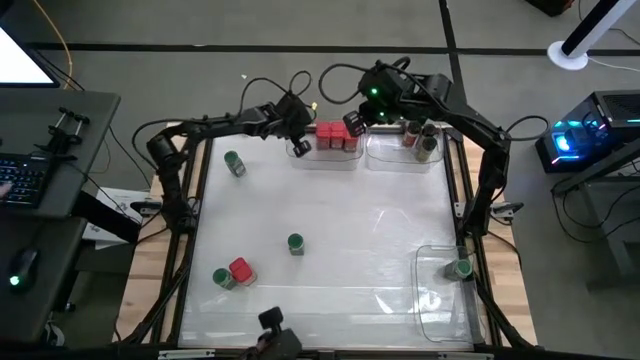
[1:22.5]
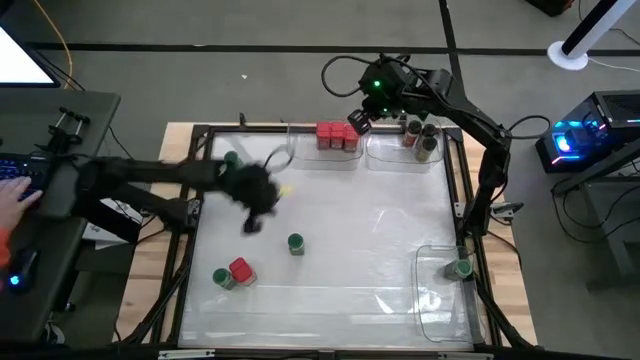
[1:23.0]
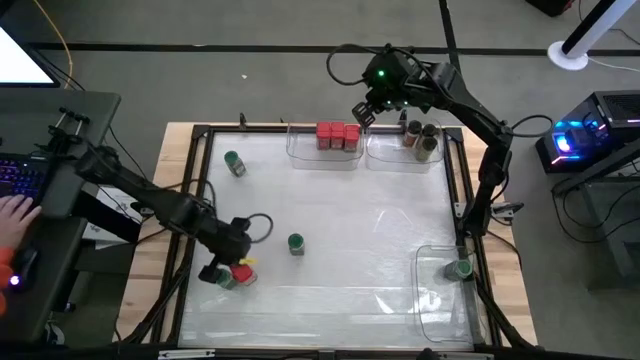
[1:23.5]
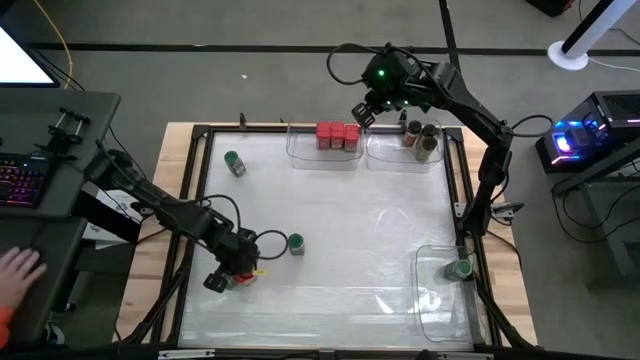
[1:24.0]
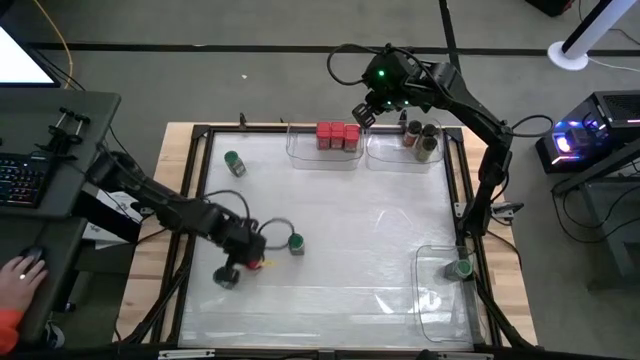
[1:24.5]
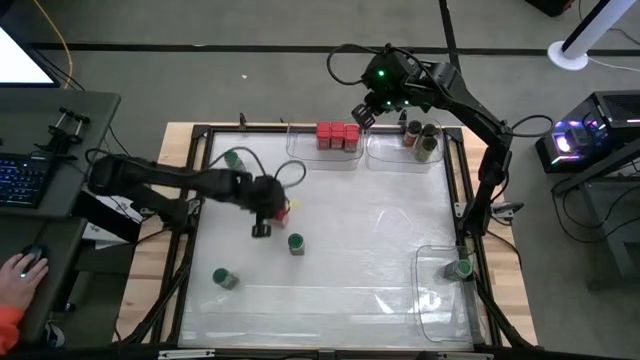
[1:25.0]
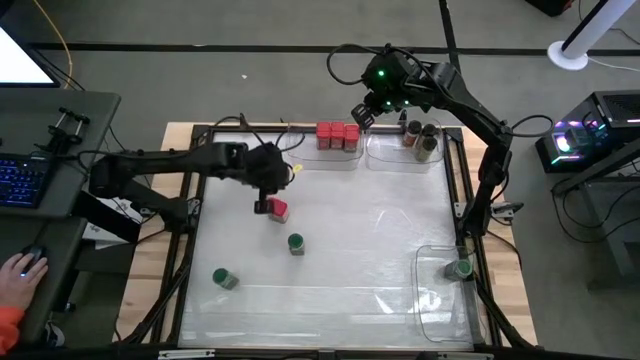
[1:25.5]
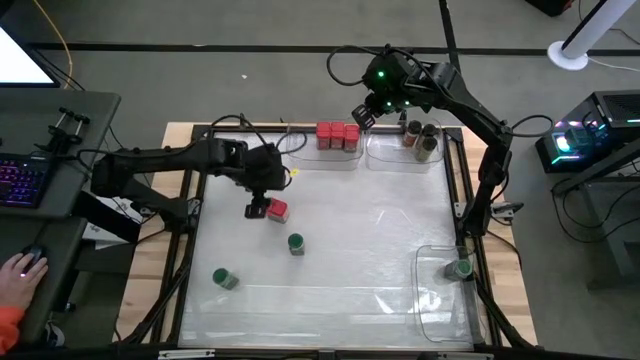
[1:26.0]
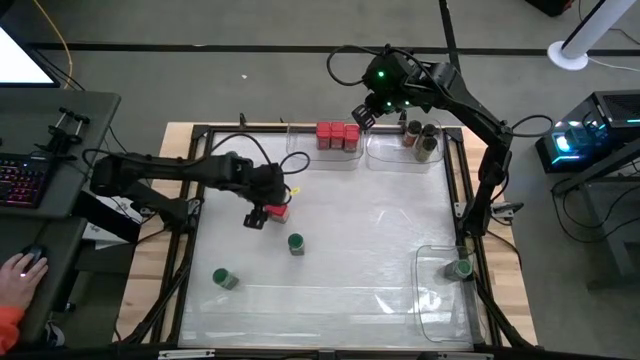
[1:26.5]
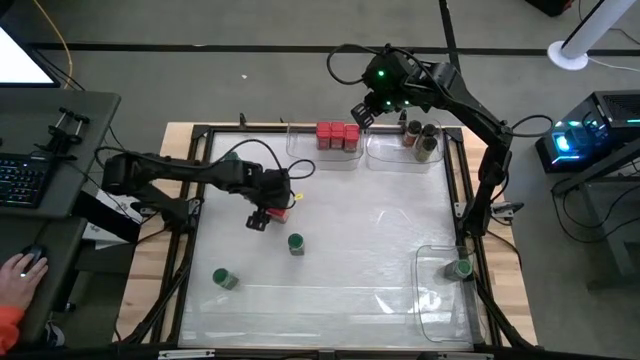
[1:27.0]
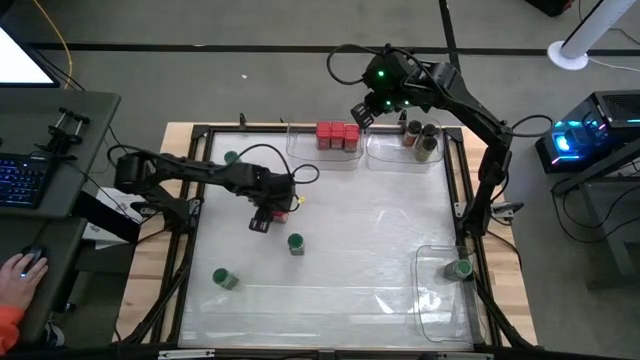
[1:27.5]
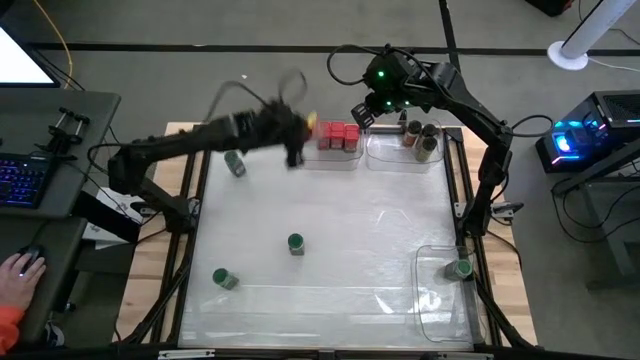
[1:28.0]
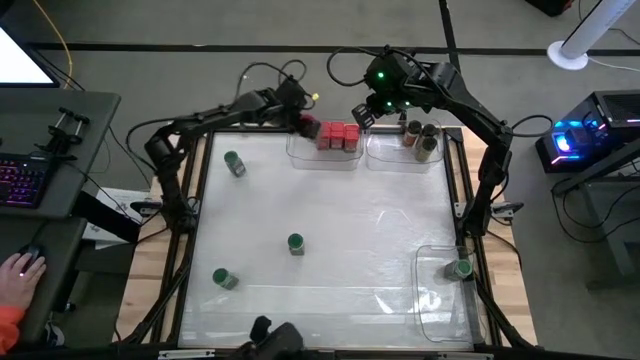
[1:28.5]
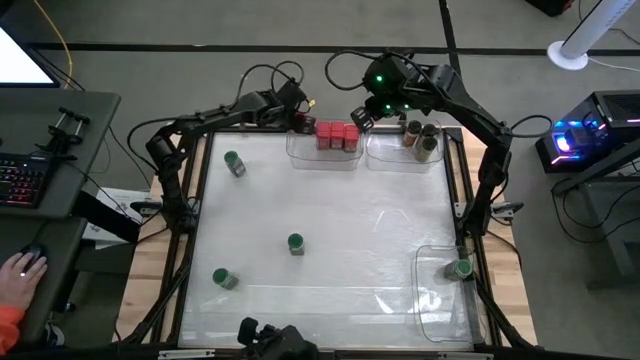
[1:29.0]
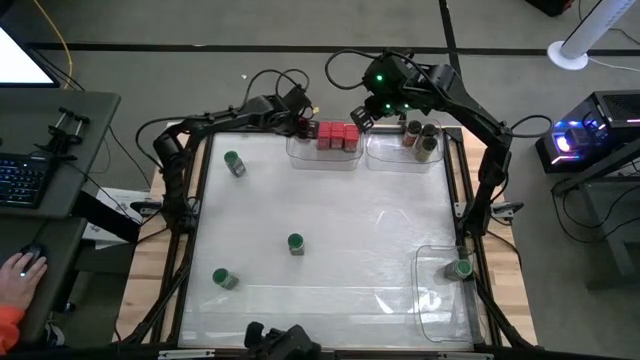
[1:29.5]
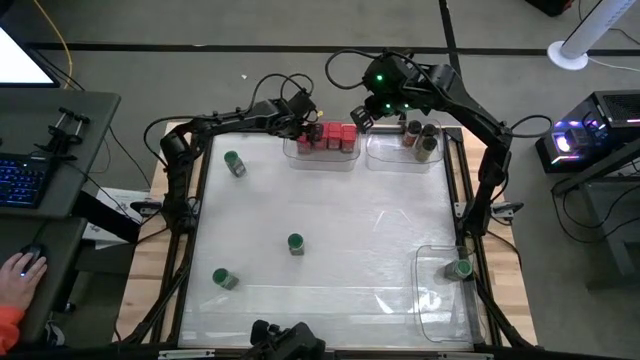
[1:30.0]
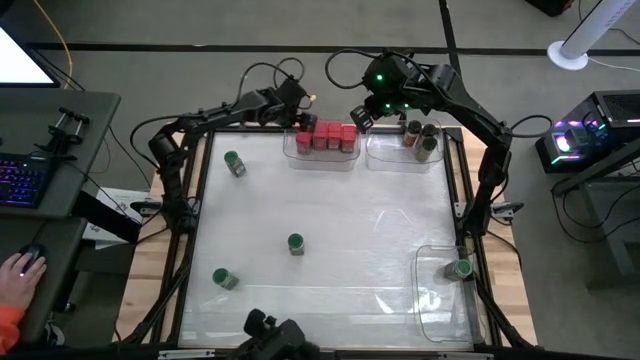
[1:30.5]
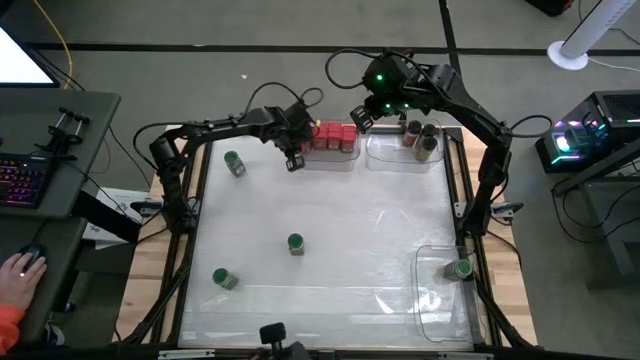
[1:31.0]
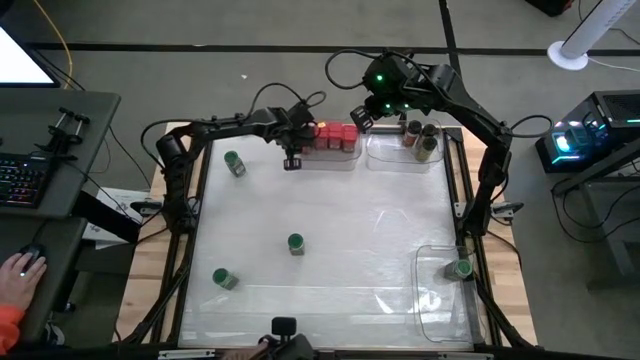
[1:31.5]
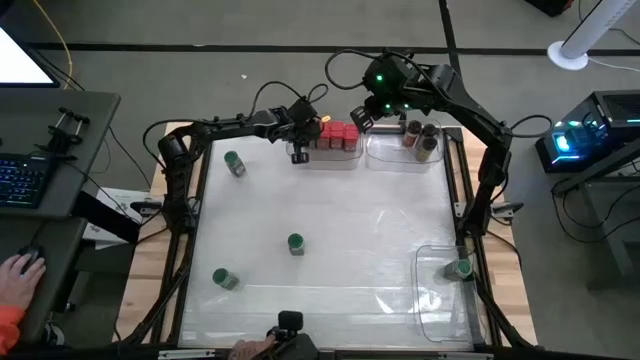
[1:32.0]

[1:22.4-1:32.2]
Task: Sort spices by type
Put the red seasoning can into the left transparent bin

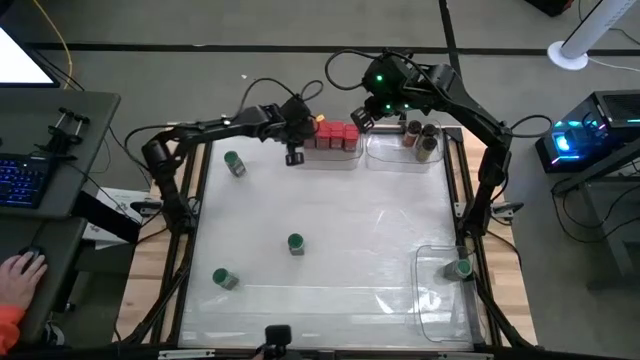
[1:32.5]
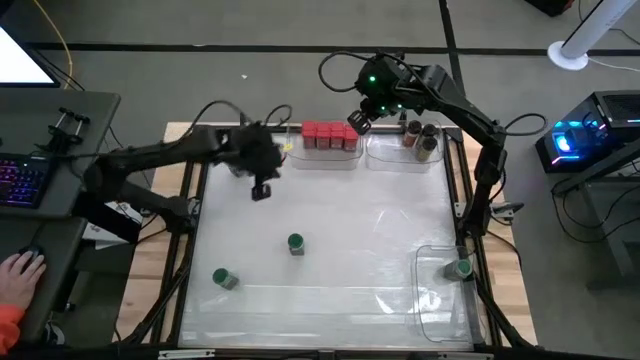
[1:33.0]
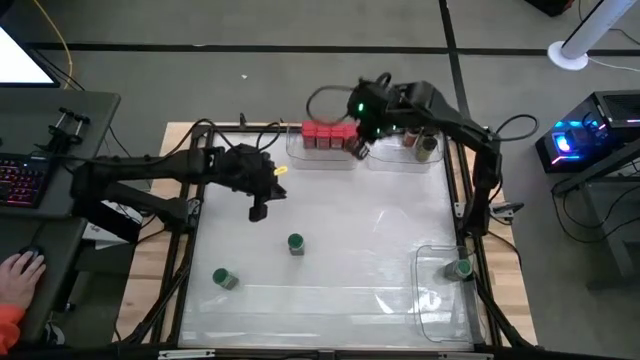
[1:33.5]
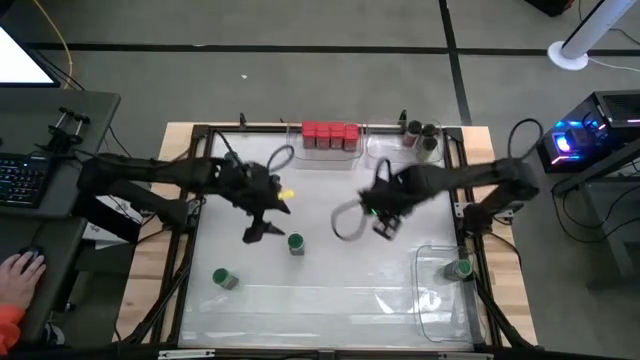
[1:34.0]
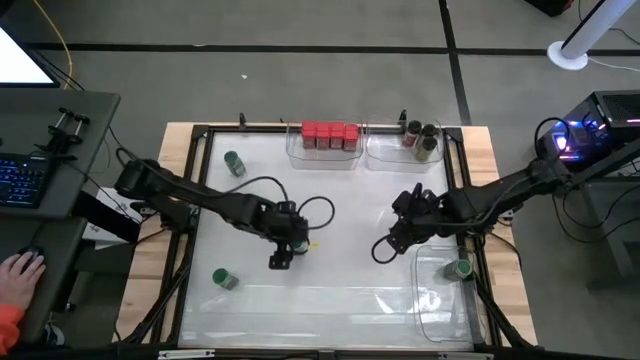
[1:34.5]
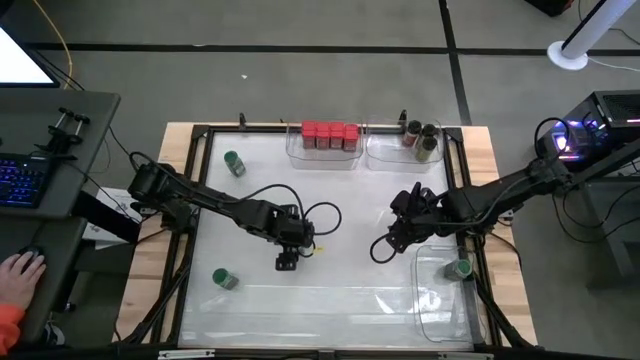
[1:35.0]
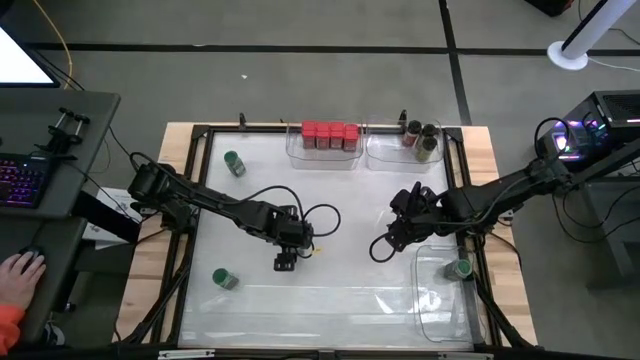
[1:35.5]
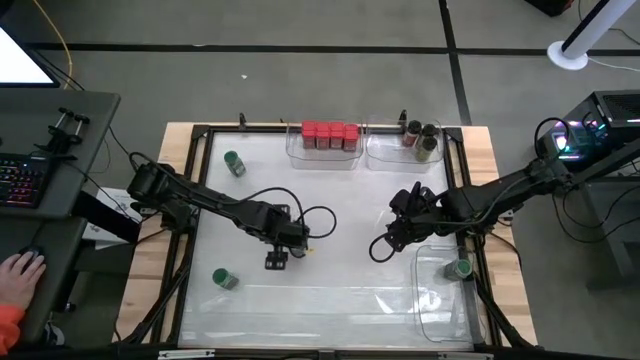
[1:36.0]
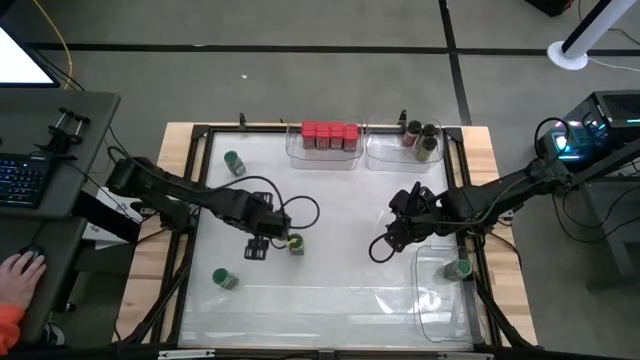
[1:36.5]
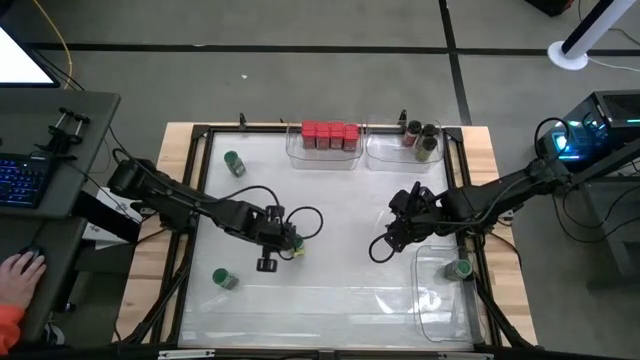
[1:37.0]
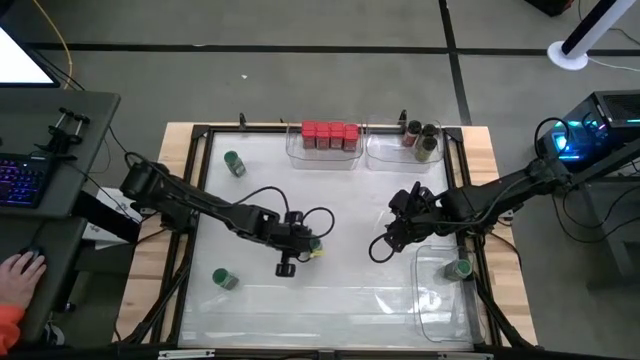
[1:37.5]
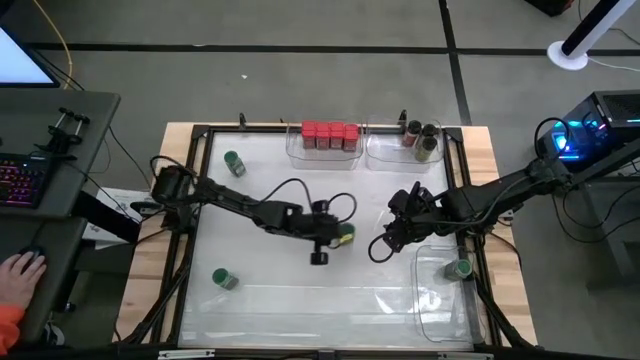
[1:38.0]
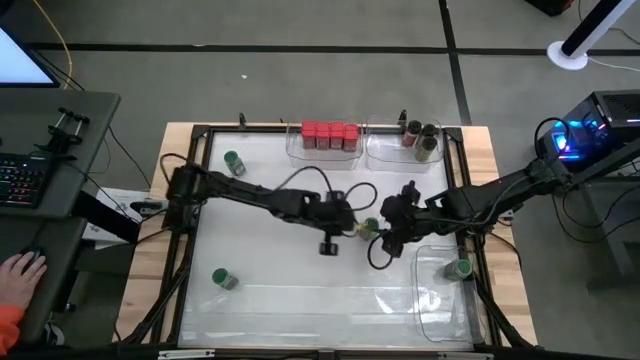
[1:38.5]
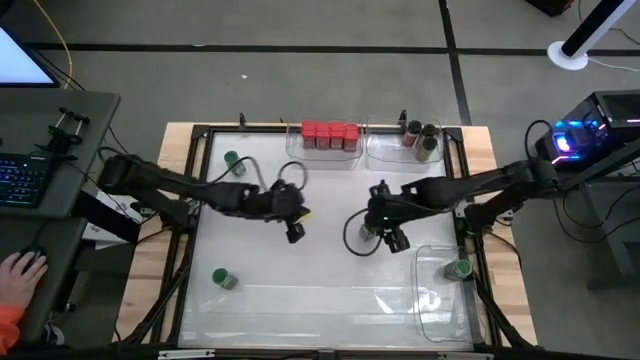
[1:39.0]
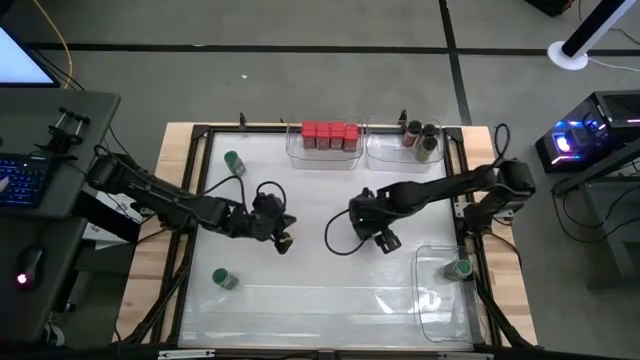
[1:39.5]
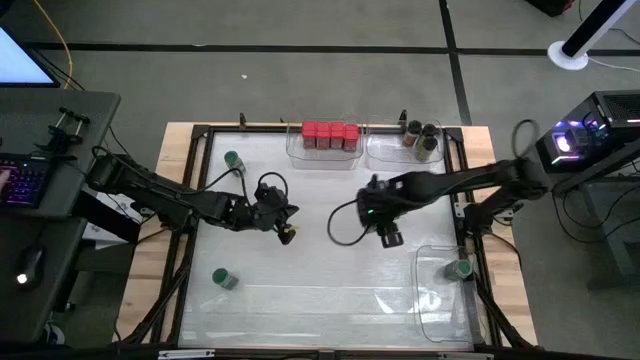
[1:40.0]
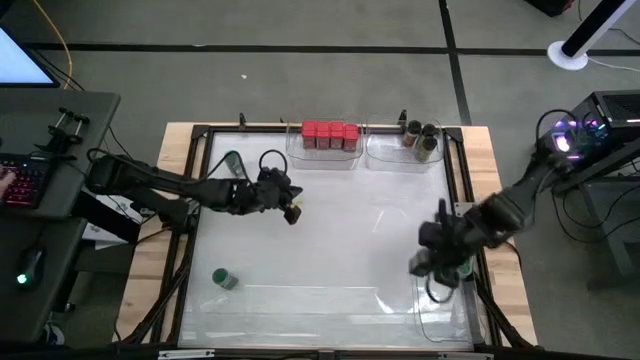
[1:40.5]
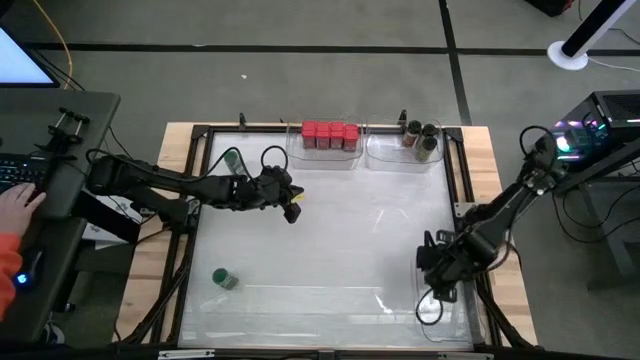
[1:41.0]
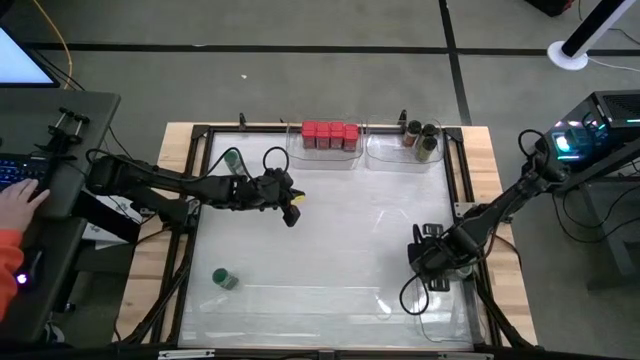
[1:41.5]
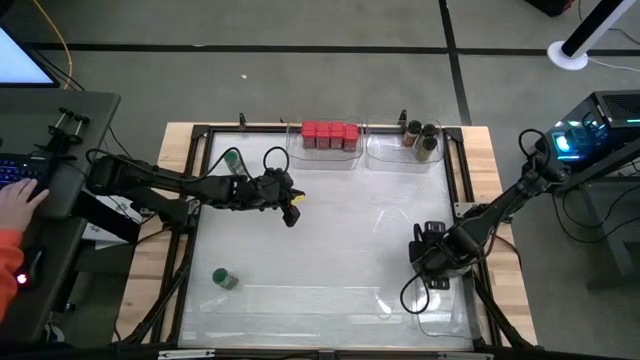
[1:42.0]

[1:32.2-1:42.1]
Put the green seasoning bottle into the bottom transparent bin

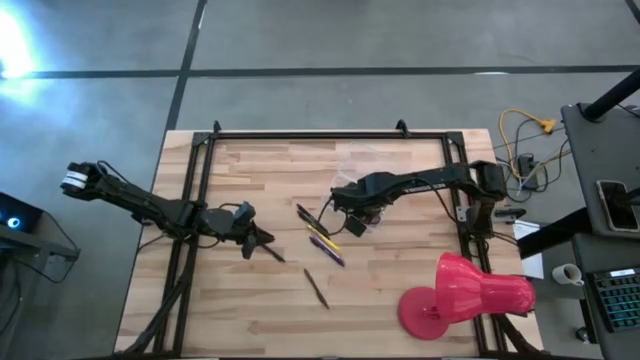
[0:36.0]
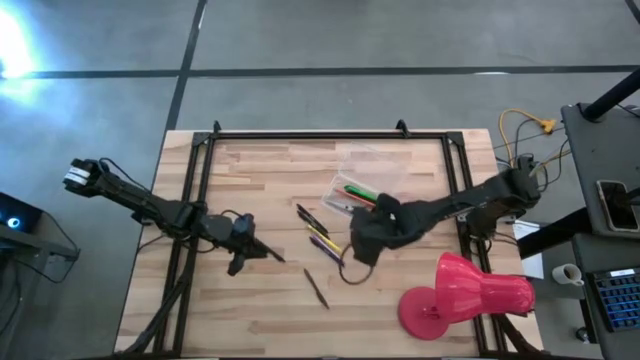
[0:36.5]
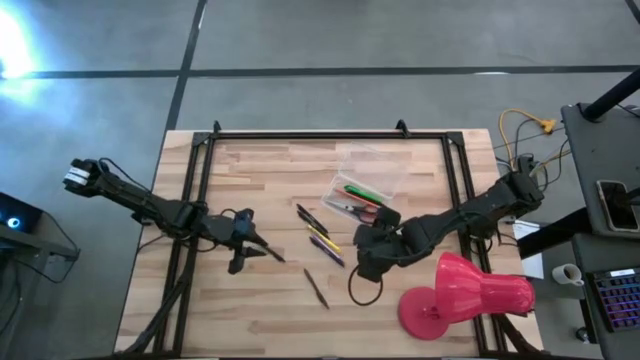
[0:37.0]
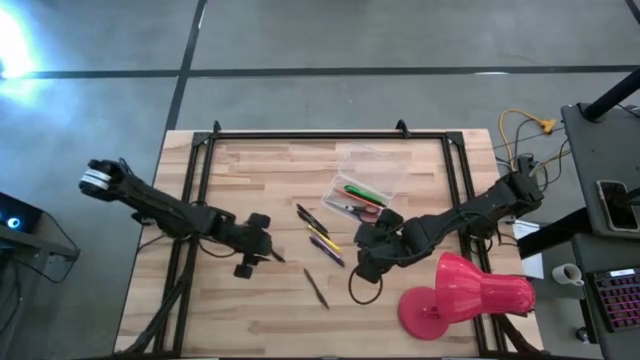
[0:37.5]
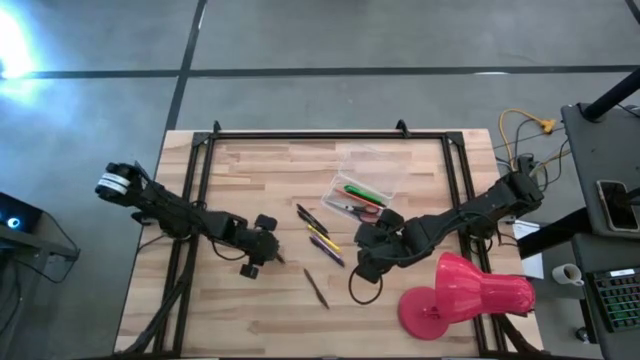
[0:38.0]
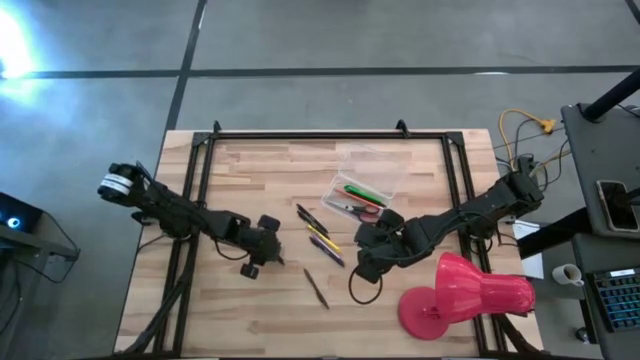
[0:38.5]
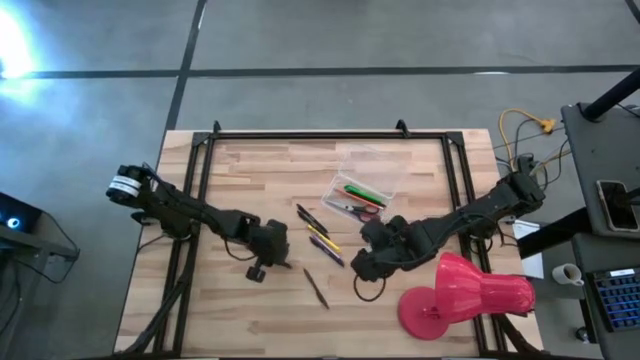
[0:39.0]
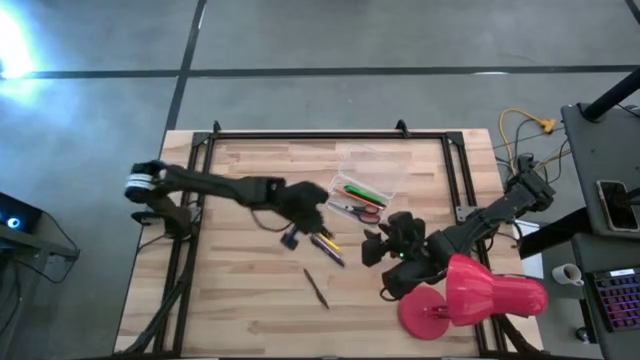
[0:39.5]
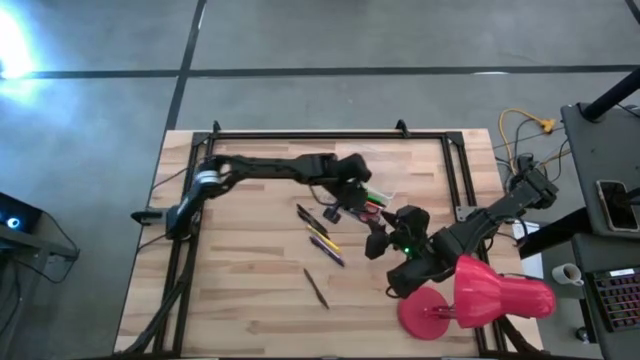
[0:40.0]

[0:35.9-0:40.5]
Task: Pick & place school supplies into a supply box
Put the black pen into the transparent supply box
